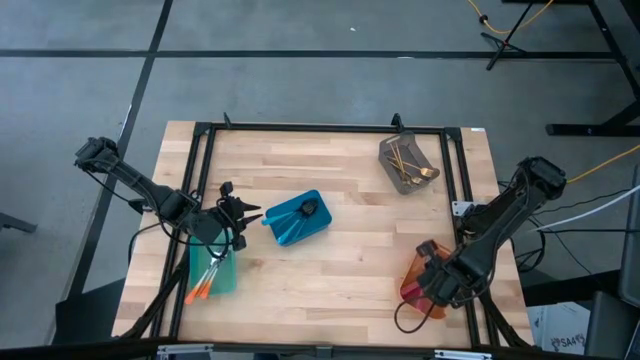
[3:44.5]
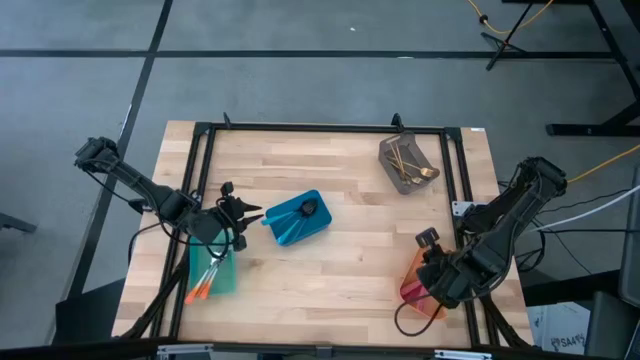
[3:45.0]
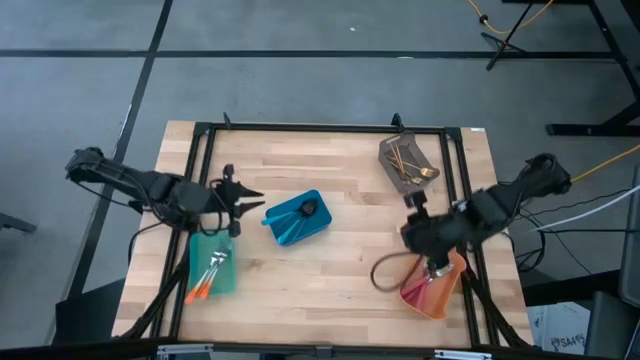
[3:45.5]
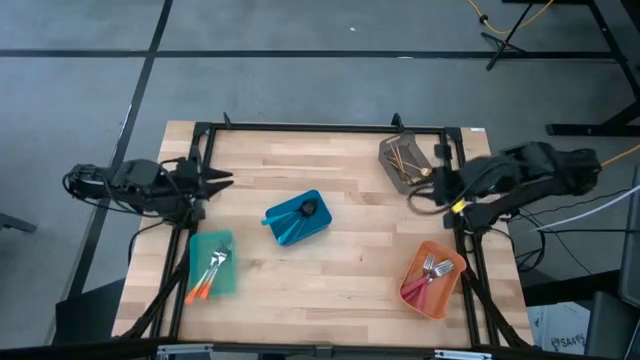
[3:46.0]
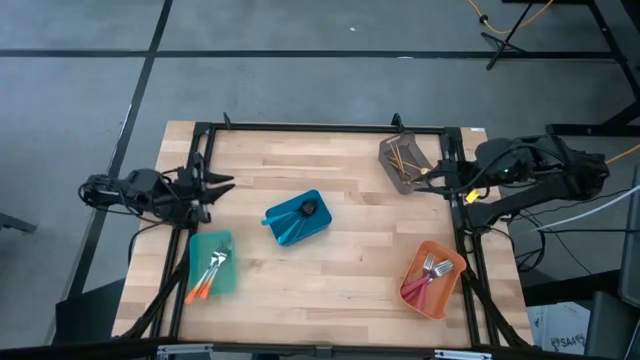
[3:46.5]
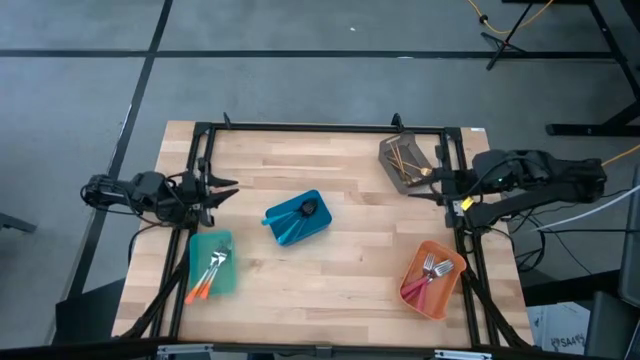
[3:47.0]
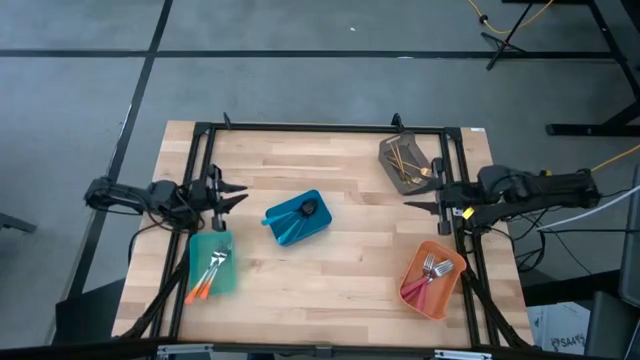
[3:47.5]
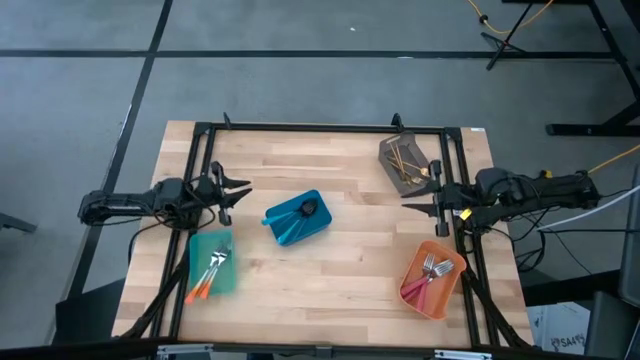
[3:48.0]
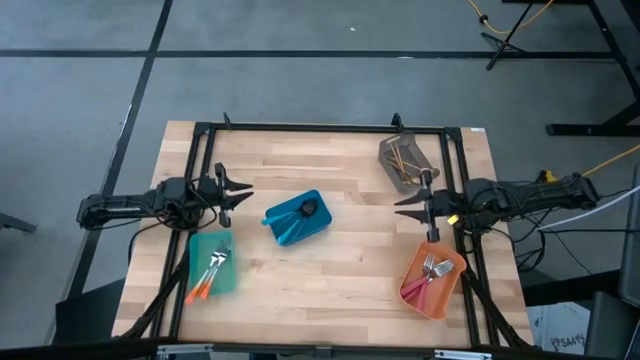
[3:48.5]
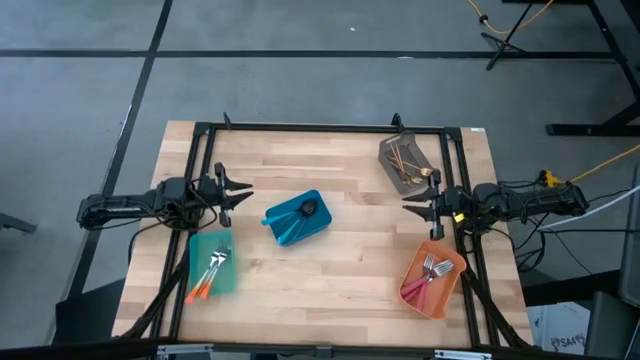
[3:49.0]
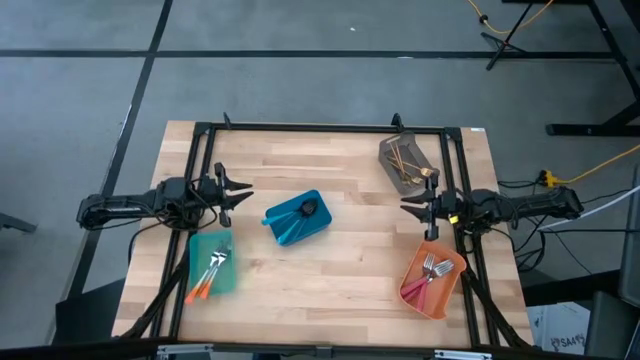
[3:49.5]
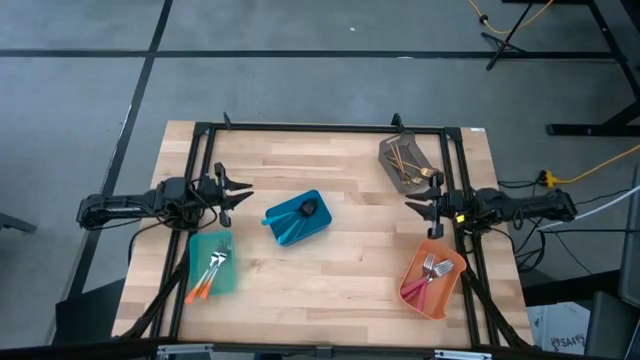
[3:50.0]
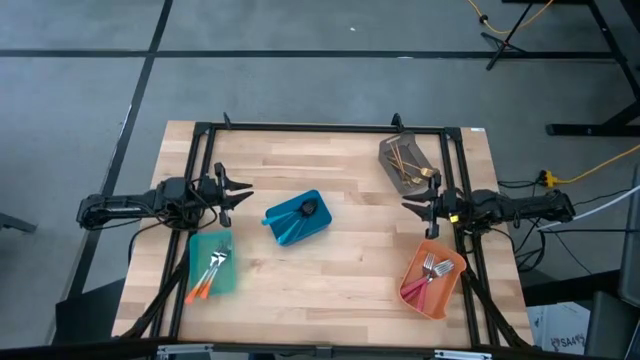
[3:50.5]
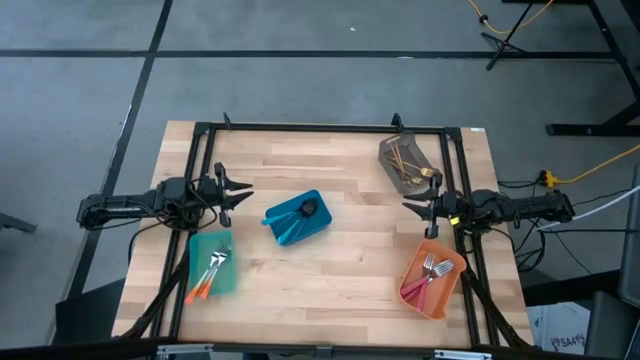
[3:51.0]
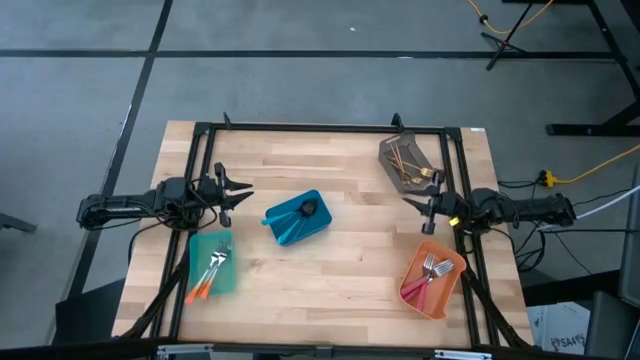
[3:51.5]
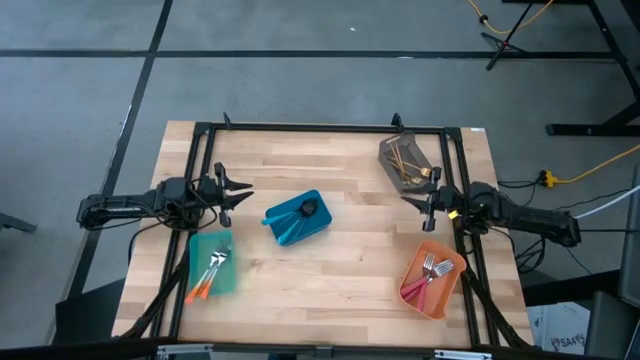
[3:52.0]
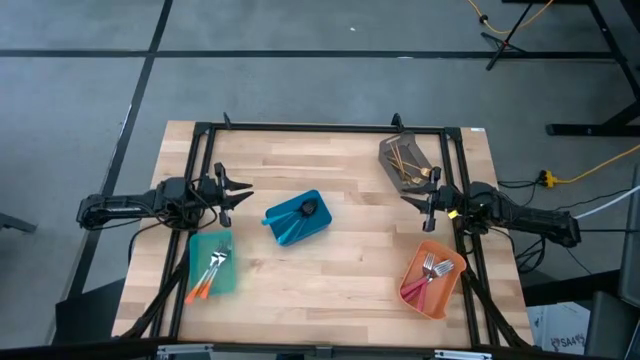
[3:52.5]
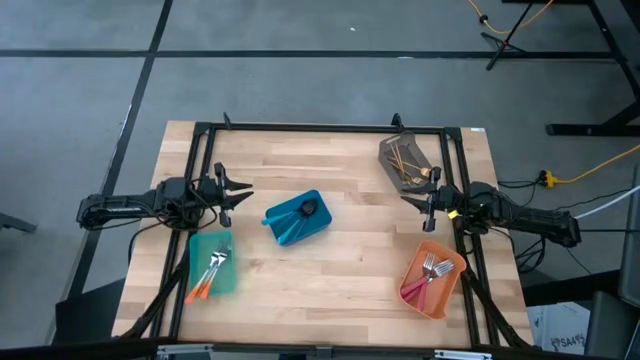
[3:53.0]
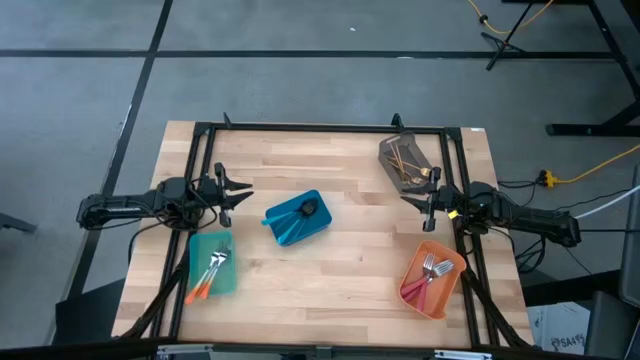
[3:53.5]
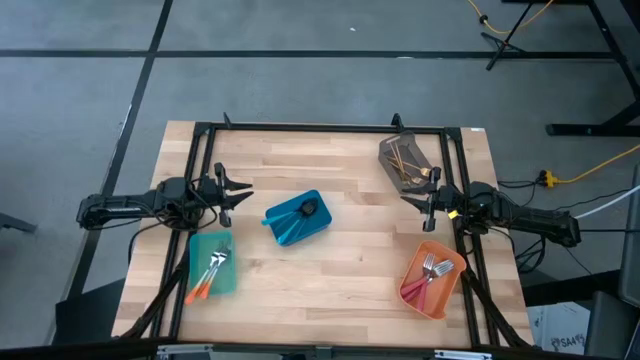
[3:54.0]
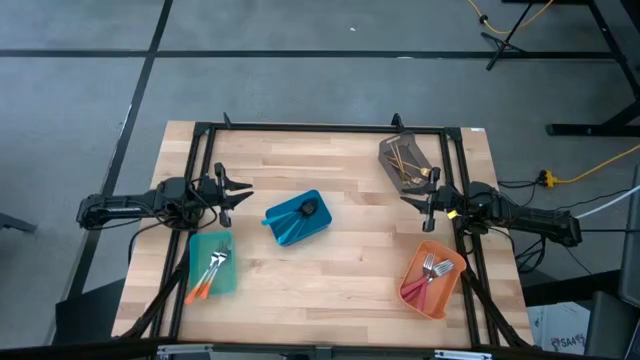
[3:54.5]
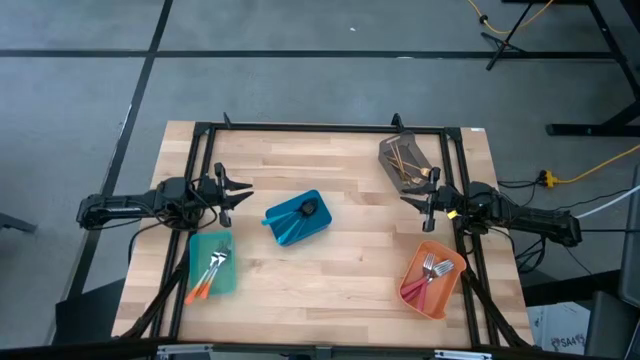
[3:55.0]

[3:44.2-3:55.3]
Task: Sort silverware by color (type)
Return to Home Position

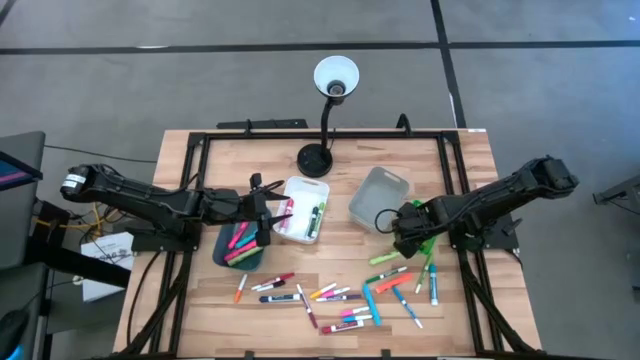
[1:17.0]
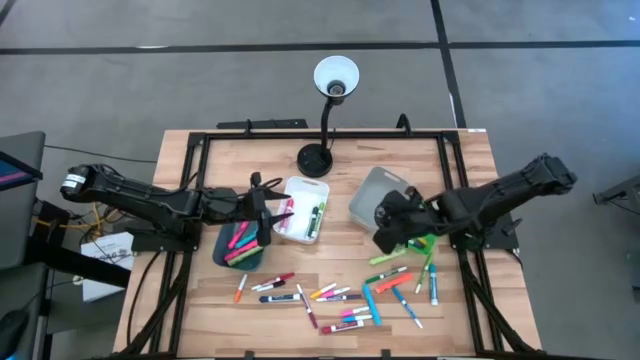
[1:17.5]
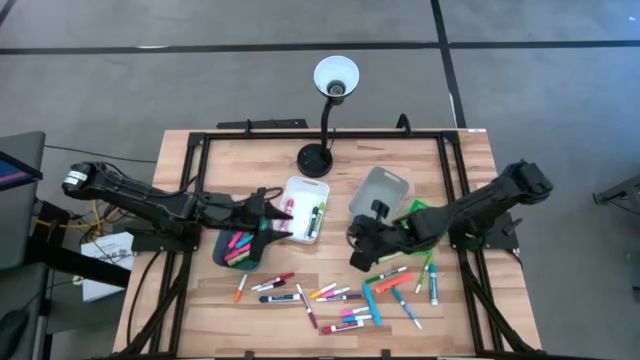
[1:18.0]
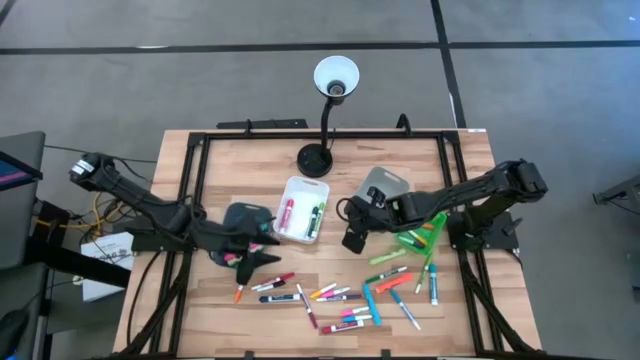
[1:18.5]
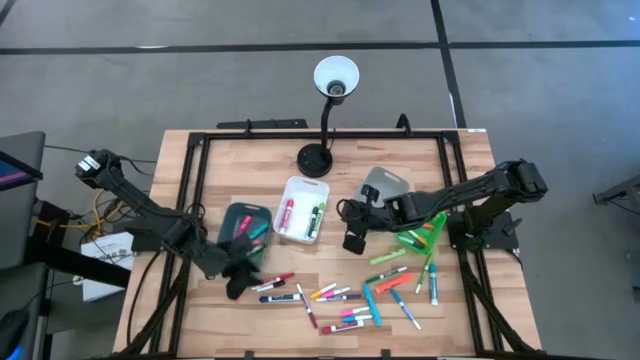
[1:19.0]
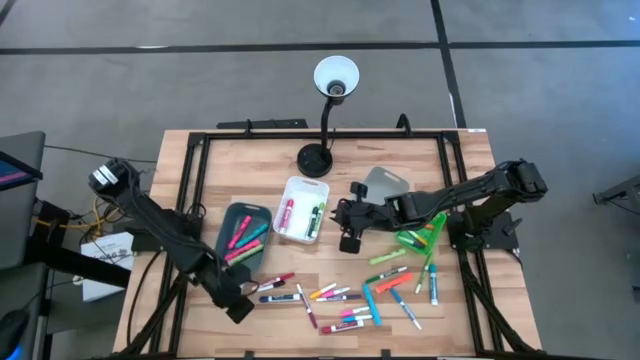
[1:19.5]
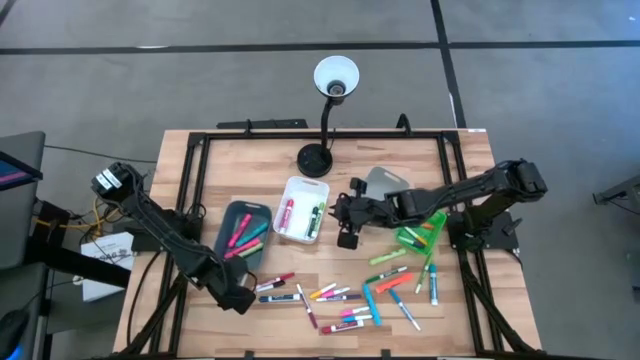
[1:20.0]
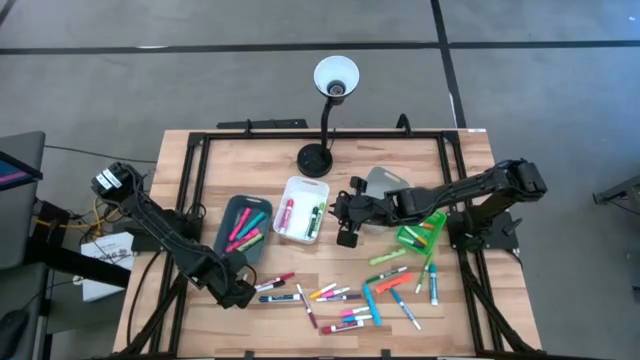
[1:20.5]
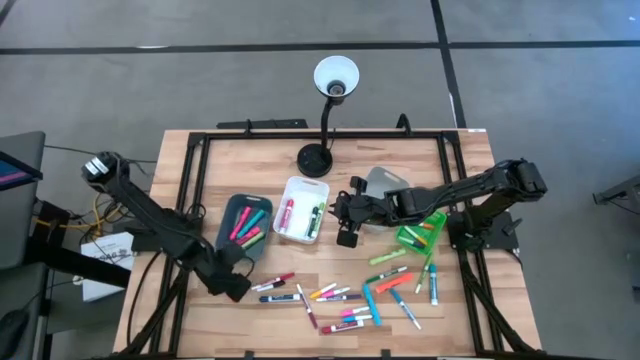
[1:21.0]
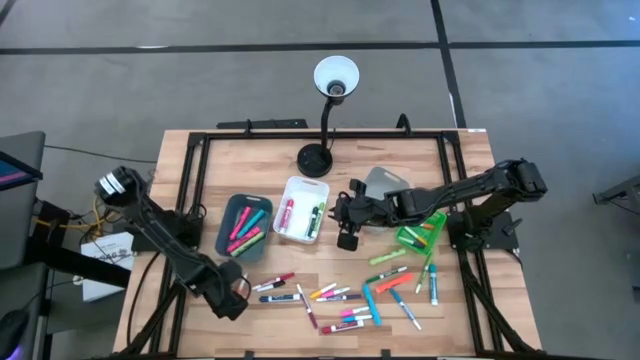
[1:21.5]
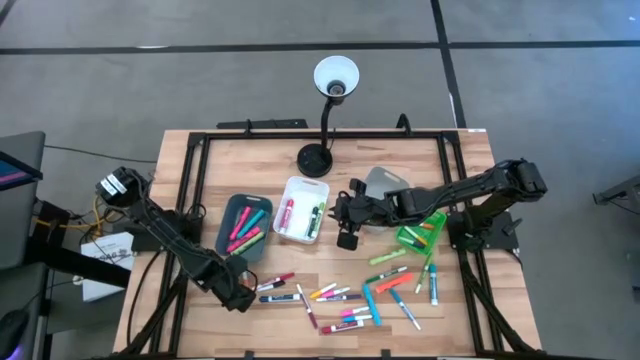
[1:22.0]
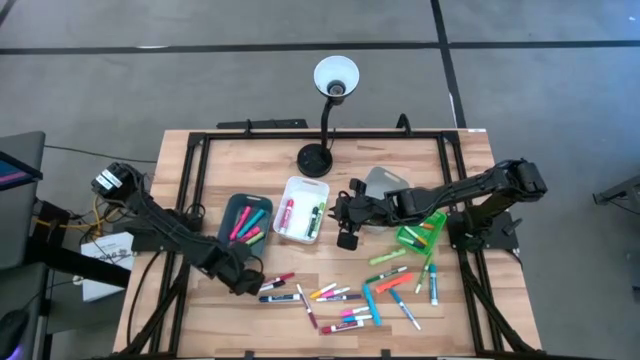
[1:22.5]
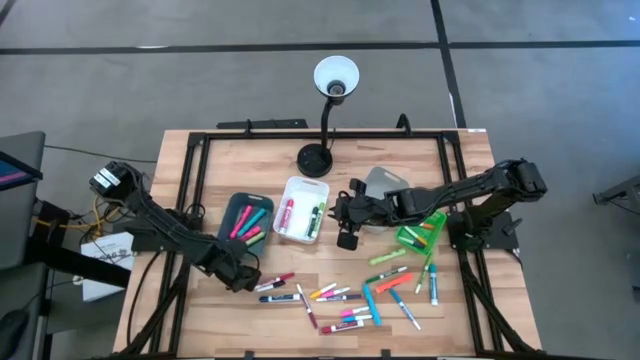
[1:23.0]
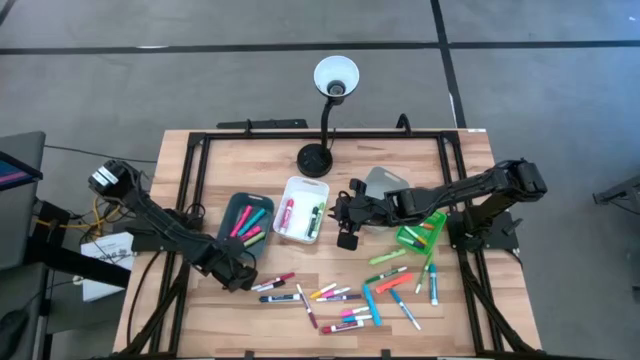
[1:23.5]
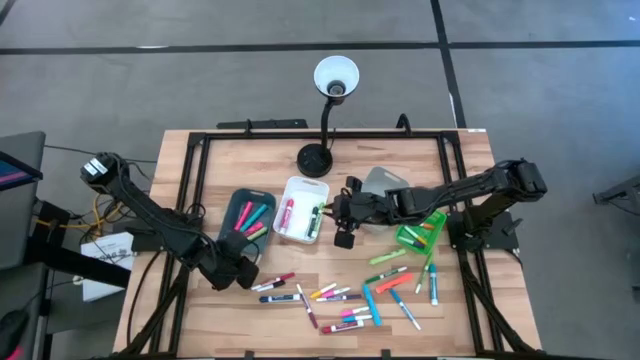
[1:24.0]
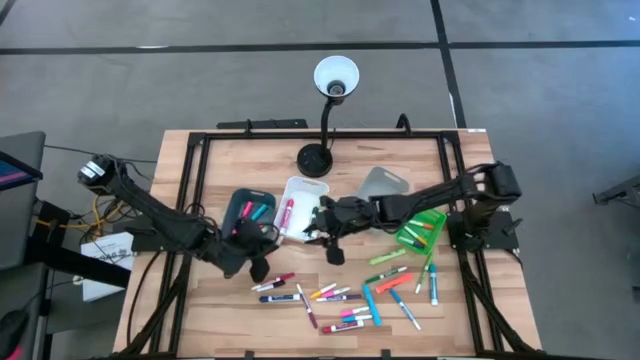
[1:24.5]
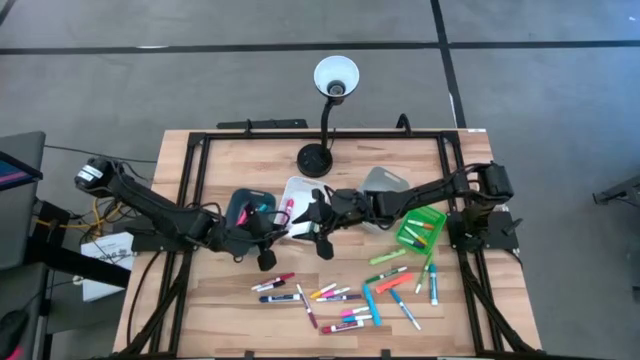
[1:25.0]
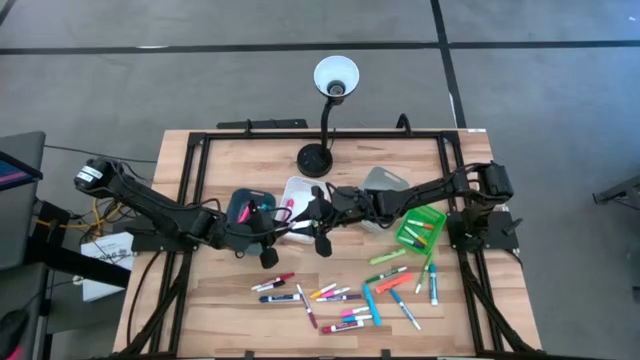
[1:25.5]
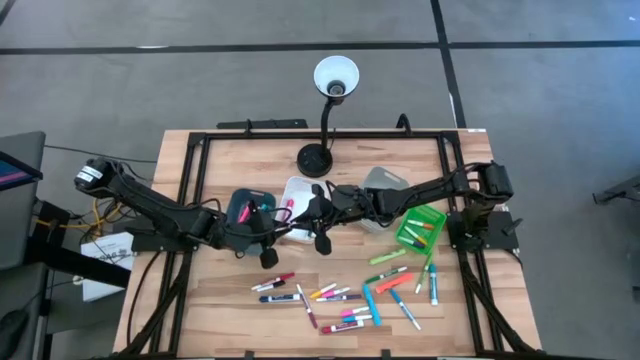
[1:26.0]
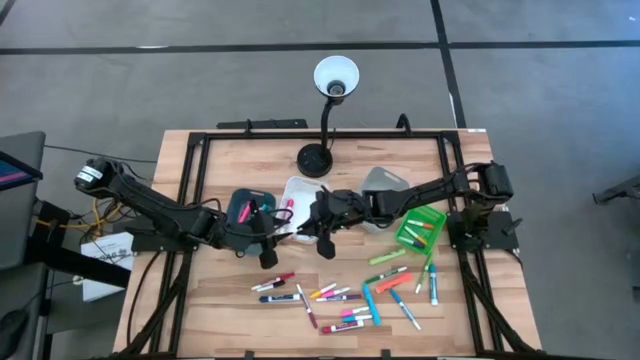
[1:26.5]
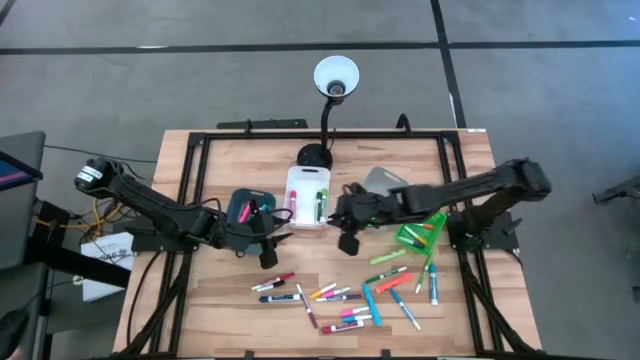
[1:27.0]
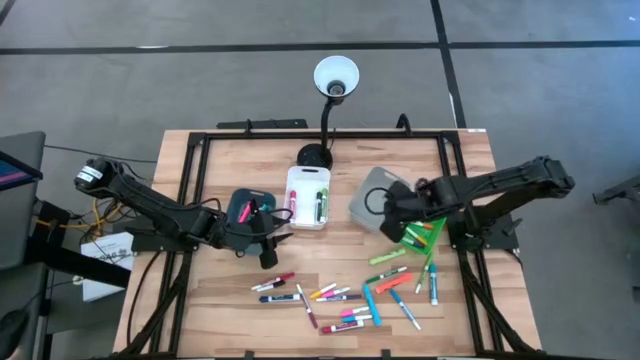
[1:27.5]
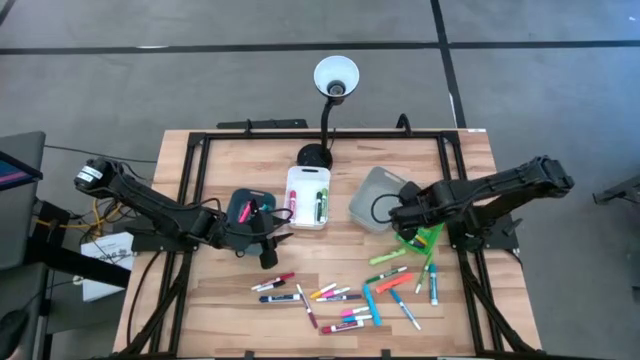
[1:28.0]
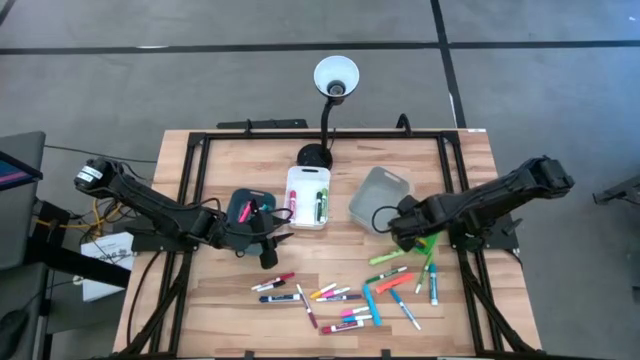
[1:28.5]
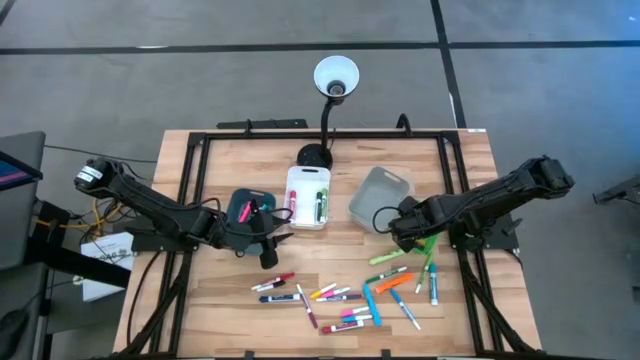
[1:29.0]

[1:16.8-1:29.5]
Task: Pick & Place Markers
Put the orange mini marker into the green bin
